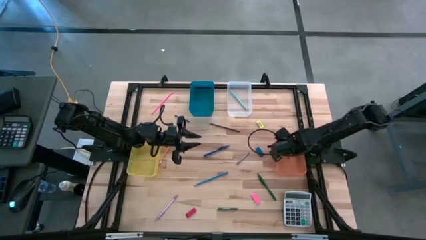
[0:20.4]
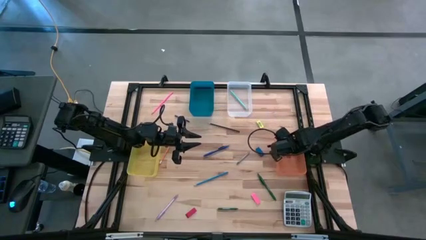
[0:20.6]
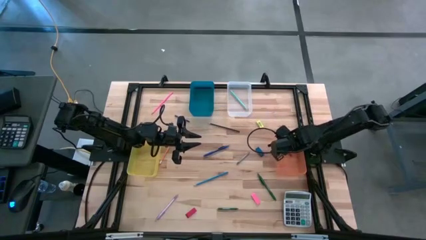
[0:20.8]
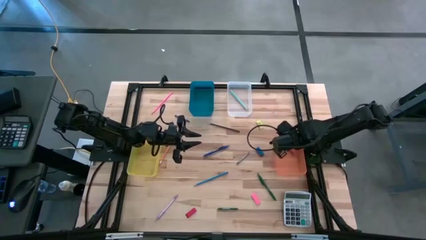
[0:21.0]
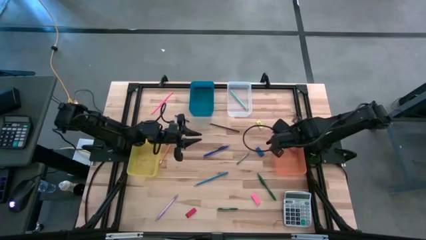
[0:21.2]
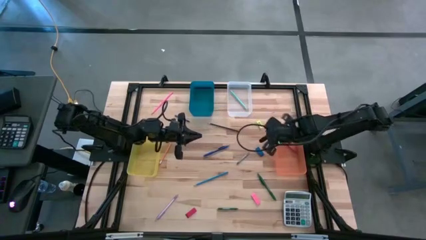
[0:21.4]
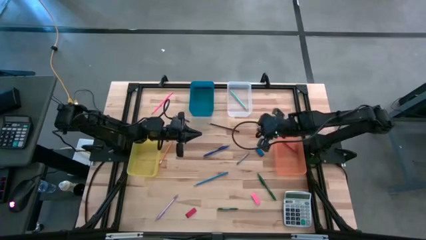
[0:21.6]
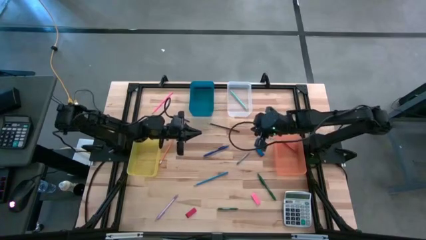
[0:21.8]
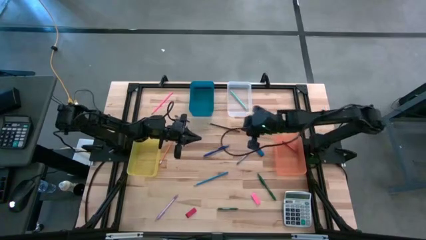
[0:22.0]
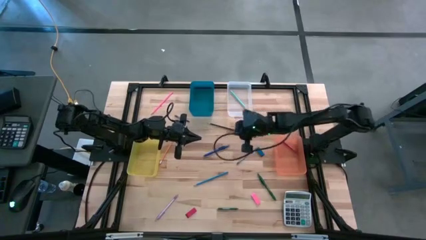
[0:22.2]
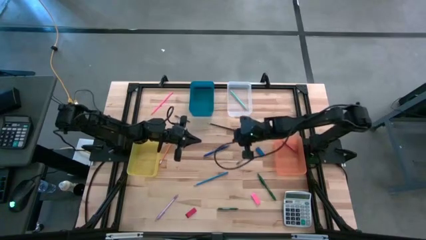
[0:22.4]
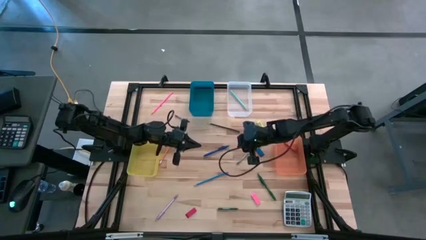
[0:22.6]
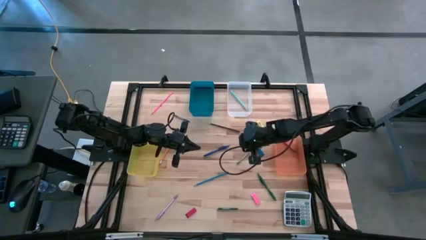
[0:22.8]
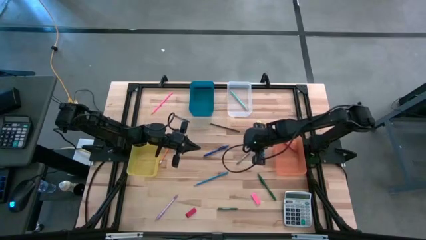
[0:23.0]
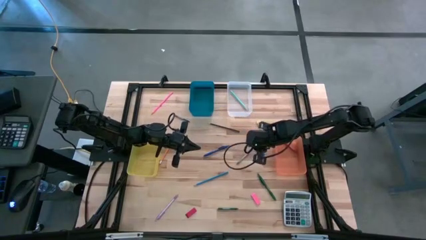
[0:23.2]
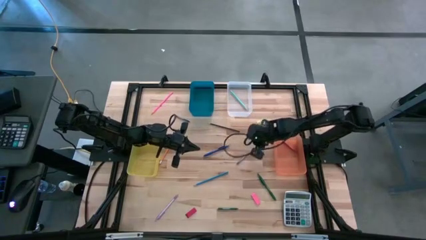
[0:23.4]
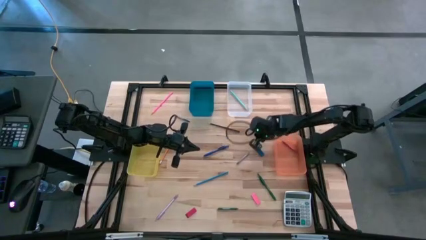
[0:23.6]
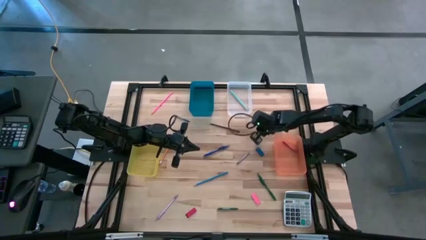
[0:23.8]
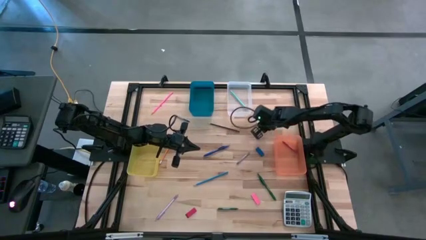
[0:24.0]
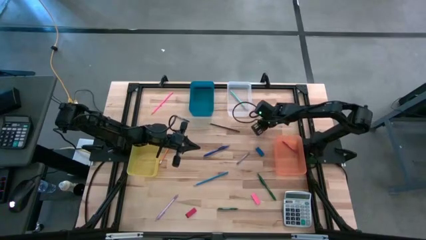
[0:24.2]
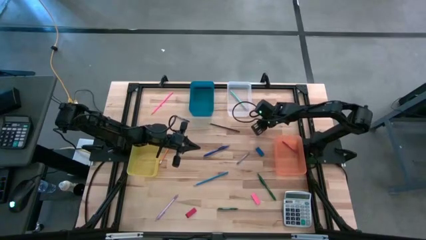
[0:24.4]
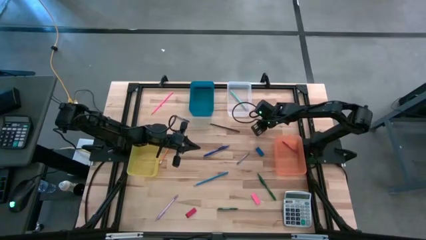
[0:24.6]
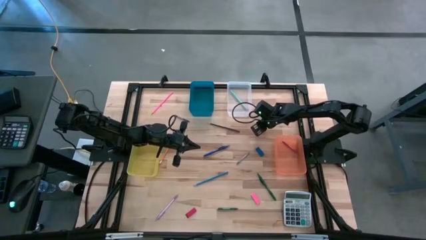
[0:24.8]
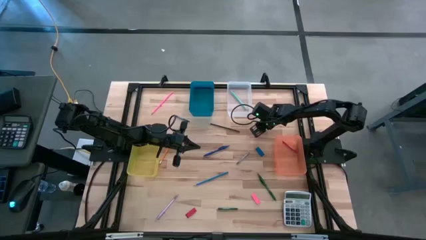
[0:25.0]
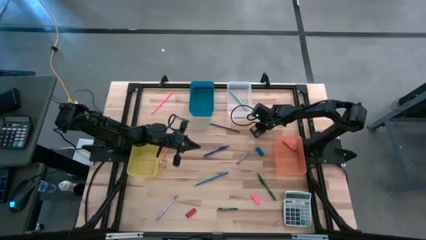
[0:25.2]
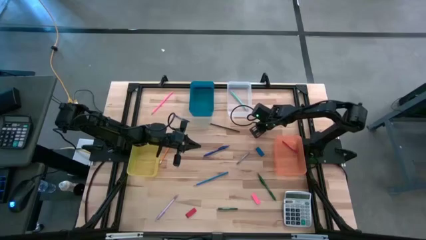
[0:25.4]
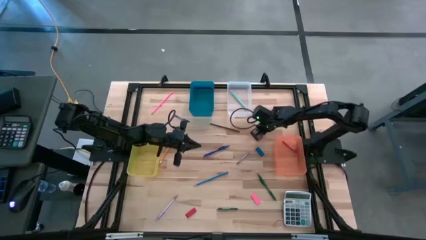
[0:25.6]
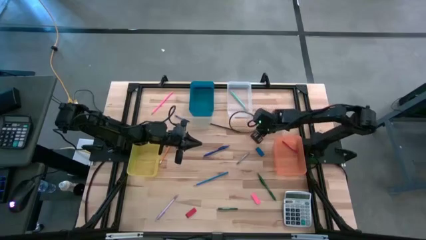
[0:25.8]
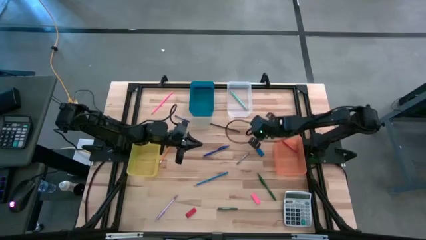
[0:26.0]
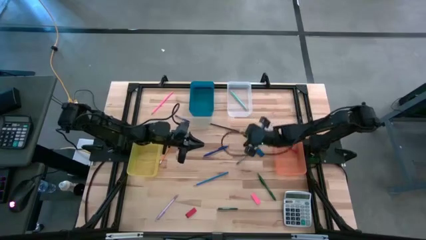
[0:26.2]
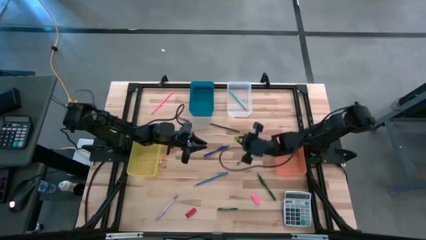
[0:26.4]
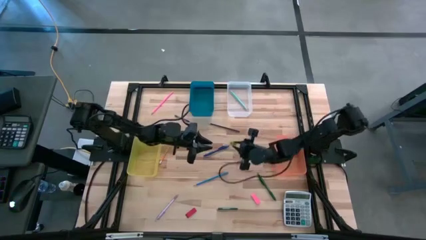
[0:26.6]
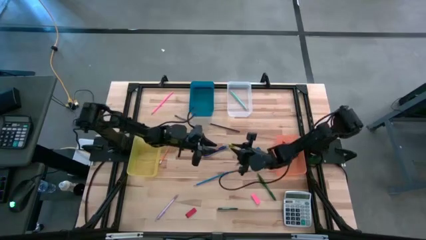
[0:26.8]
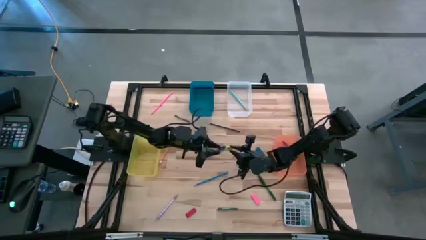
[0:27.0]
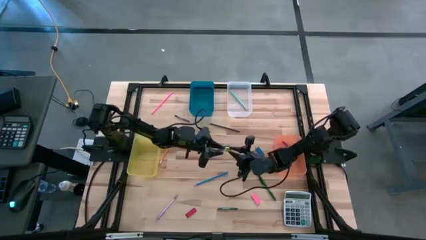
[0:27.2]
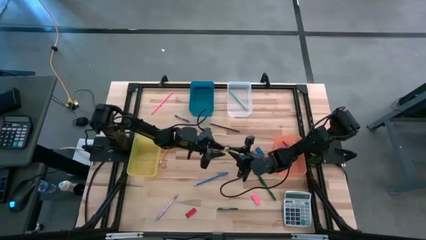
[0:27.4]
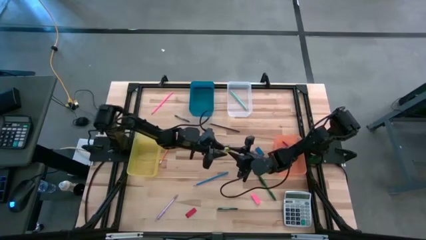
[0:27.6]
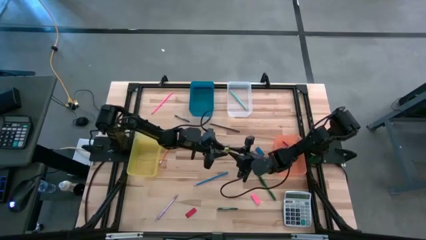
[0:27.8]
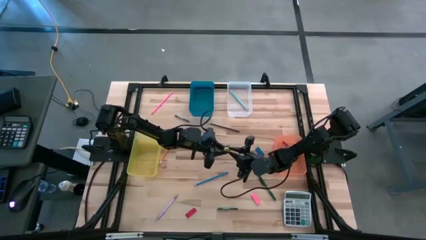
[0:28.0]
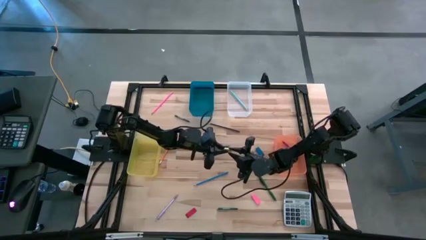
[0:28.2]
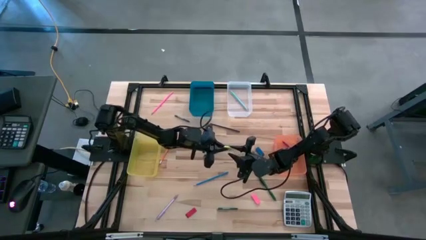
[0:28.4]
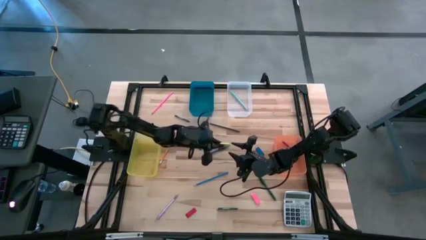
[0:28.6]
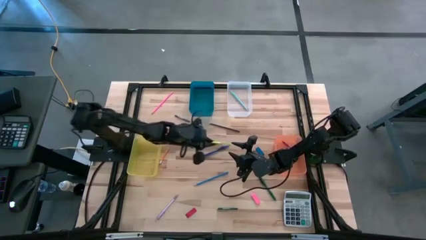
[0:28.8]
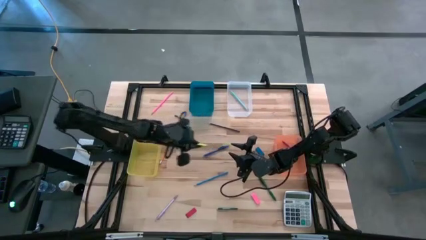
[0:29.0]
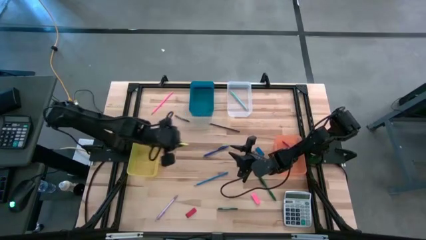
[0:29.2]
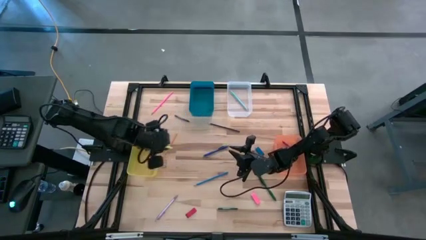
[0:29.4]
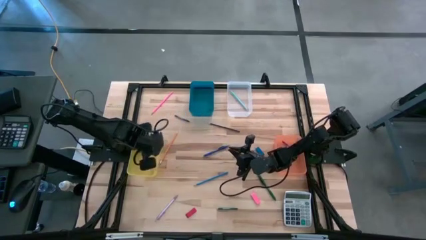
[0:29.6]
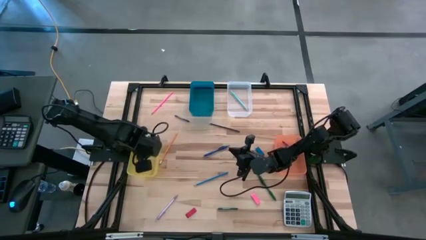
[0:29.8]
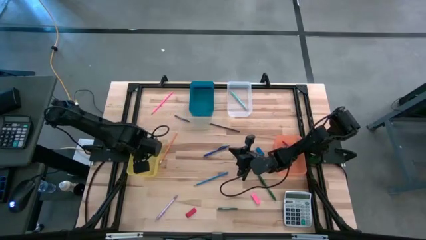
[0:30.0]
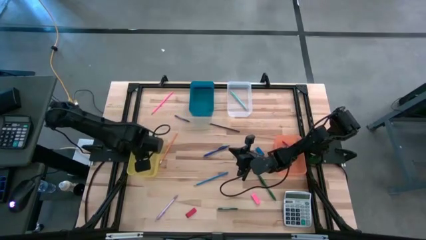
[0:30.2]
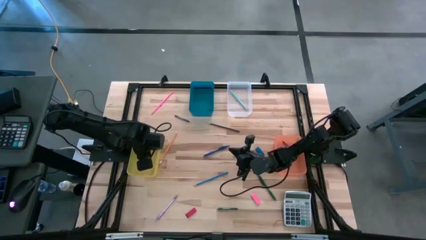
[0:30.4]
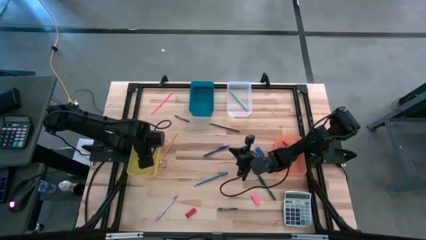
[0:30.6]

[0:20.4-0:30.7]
Task: Sort crayons/erasers/pens/pencils in bins
Put the yellow eraser into the yellow bin

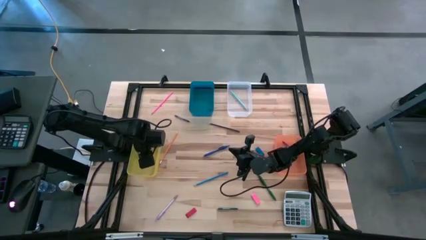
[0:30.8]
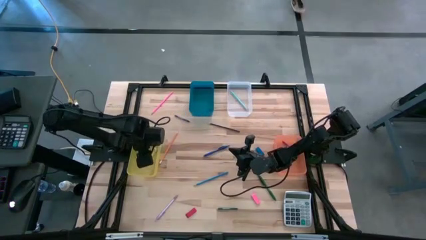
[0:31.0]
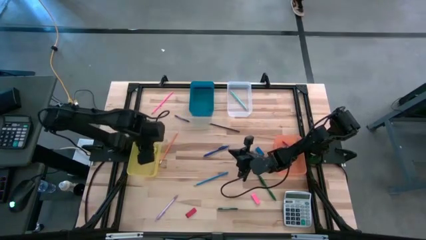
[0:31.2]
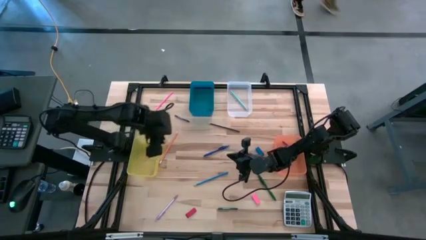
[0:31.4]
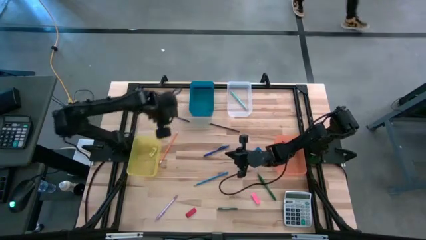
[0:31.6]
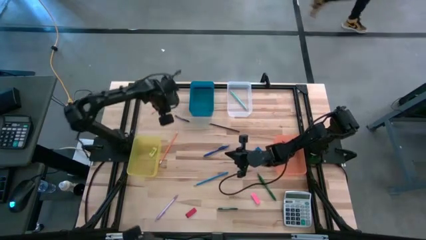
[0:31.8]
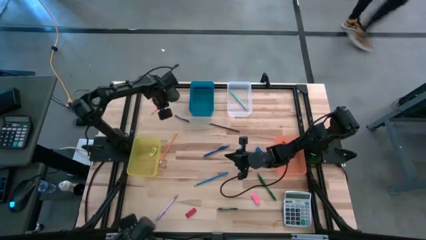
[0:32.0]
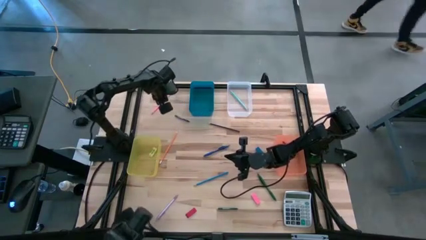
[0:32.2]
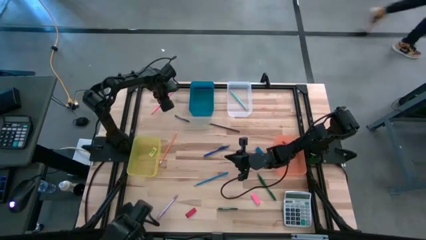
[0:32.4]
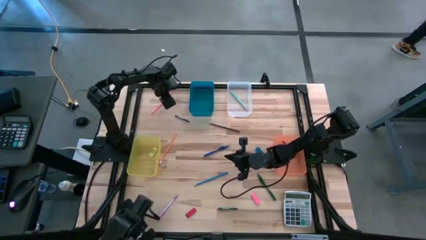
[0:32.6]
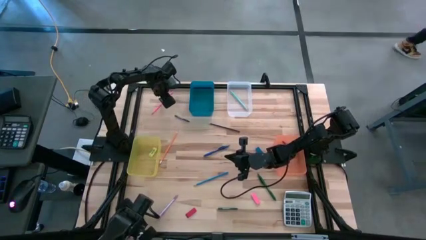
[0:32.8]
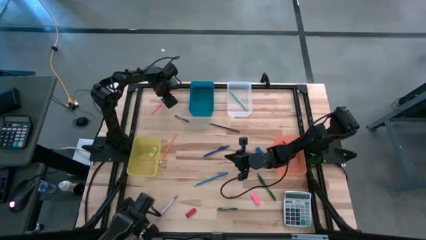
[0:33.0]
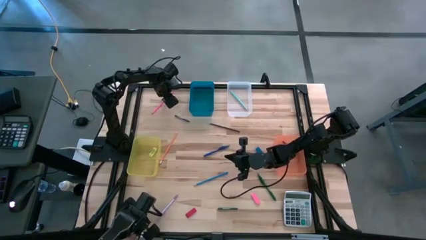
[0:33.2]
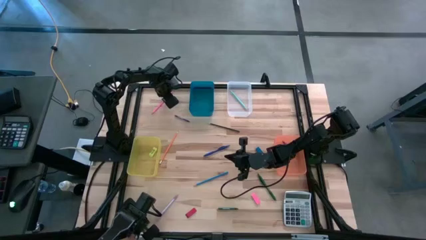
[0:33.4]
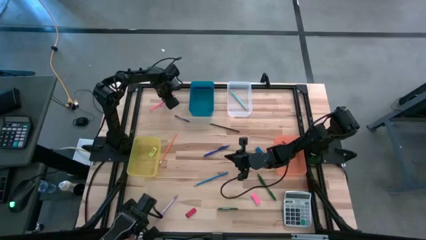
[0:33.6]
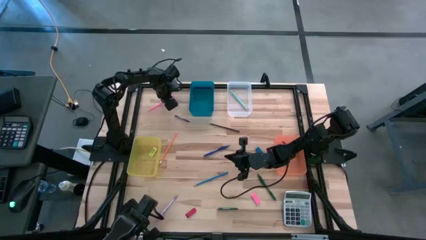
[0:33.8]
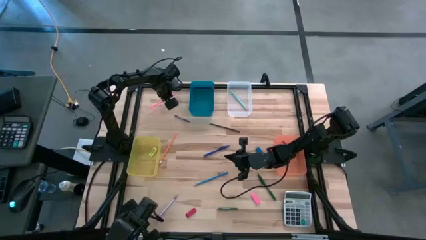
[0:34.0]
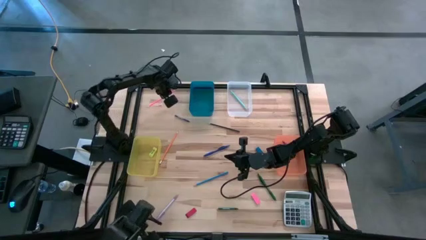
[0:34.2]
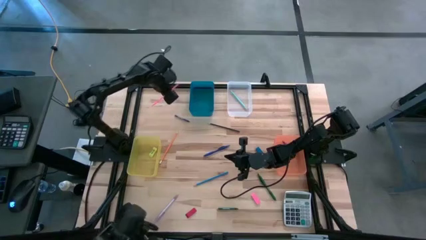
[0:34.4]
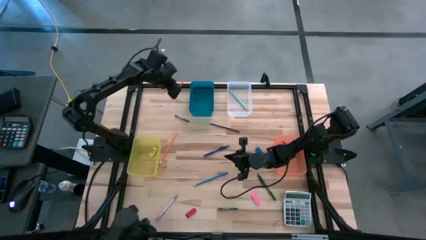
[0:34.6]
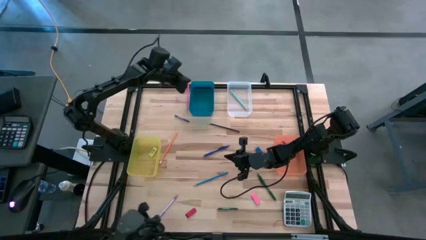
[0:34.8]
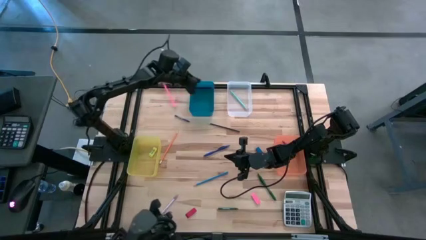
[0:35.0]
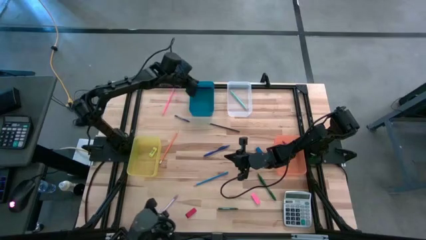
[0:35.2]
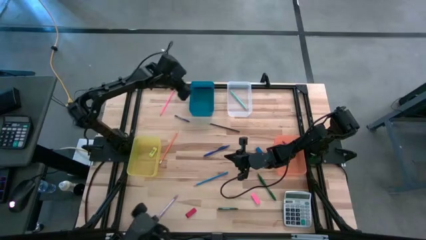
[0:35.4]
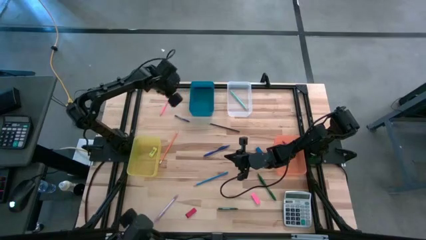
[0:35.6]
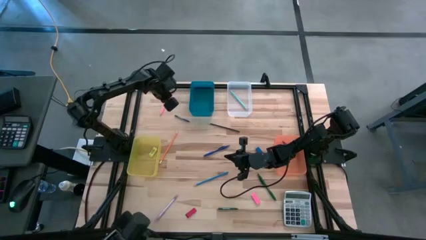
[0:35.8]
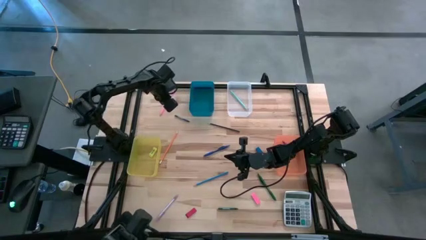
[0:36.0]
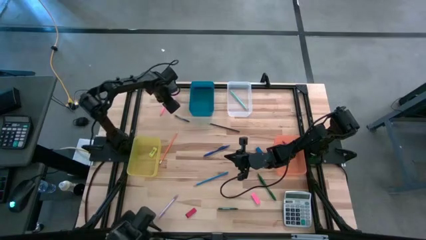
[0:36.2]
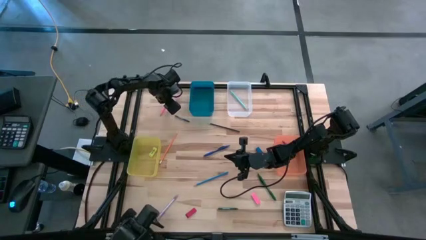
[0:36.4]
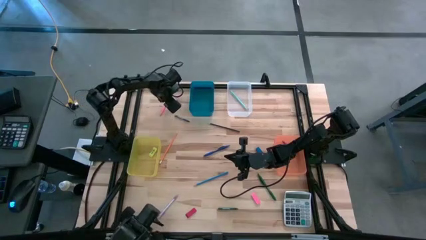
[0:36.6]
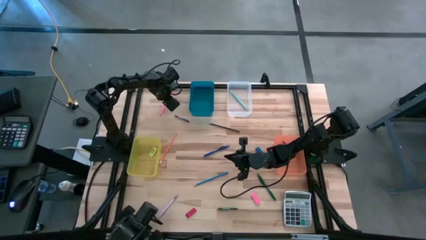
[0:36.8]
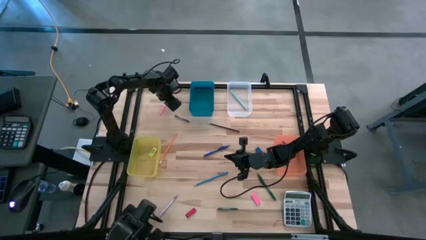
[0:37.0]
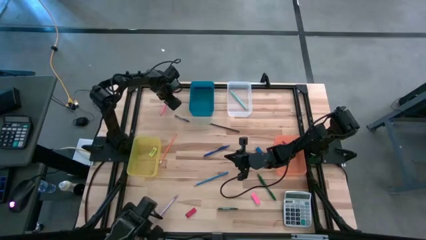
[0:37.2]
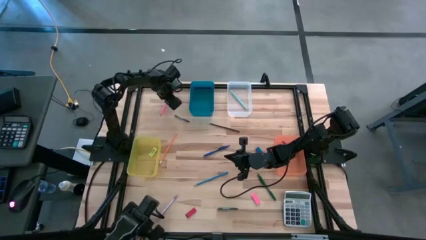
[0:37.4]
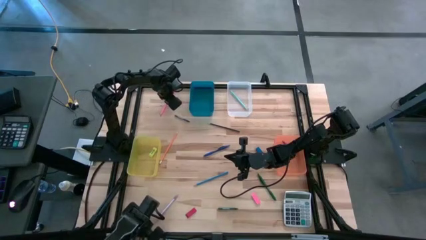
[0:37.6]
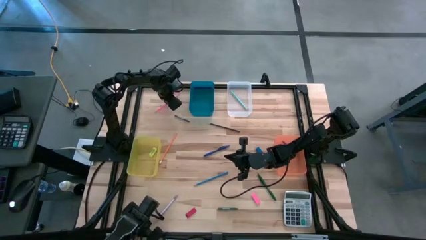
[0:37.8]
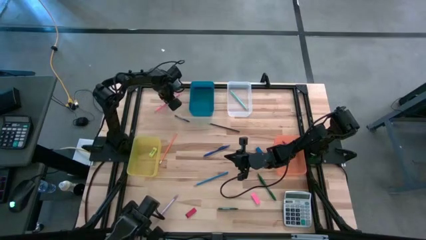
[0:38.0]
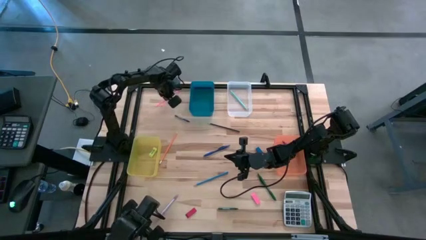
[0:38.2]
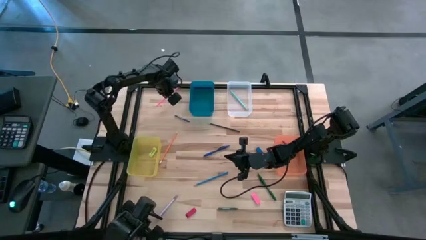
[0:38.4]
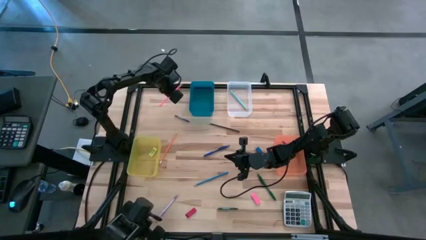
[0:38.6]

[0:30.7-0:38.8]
Put the pink pencil into the blue bin
